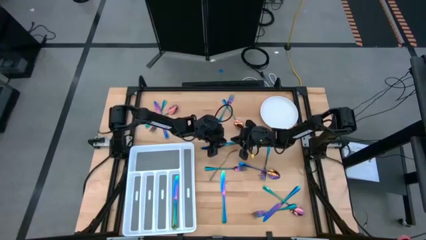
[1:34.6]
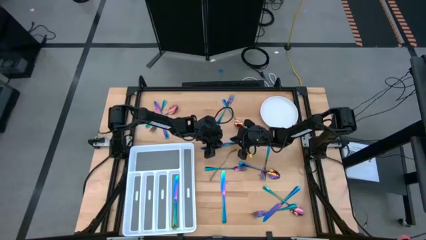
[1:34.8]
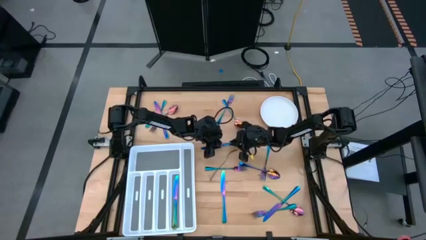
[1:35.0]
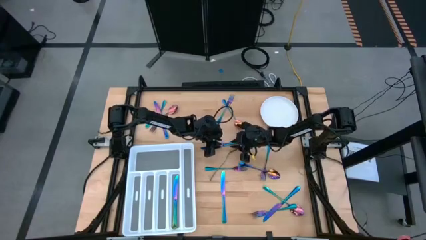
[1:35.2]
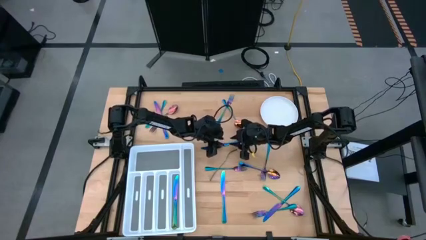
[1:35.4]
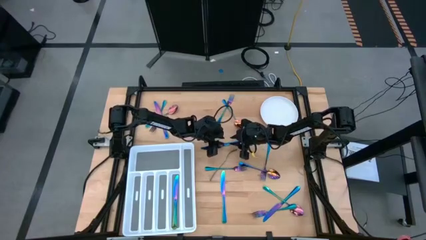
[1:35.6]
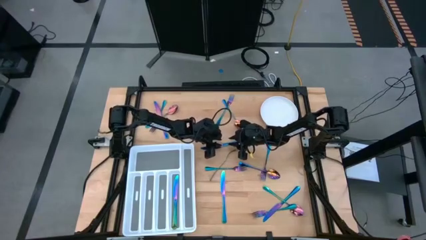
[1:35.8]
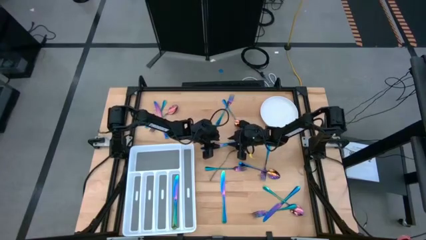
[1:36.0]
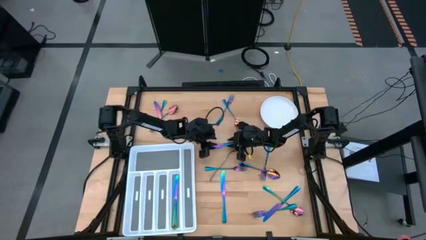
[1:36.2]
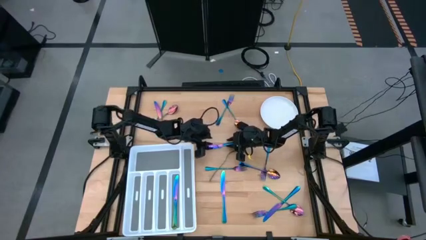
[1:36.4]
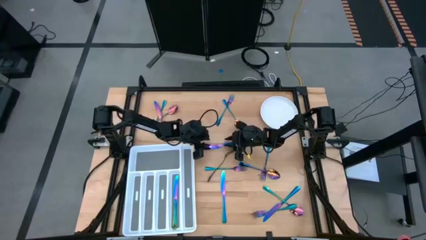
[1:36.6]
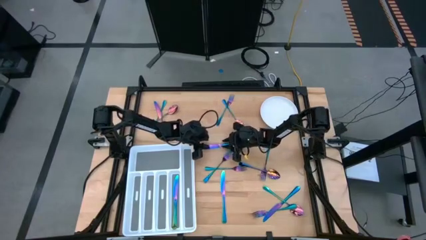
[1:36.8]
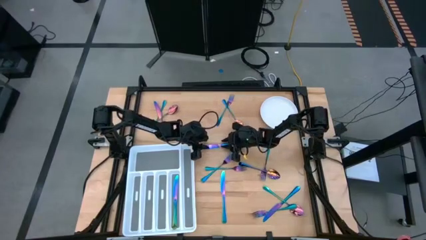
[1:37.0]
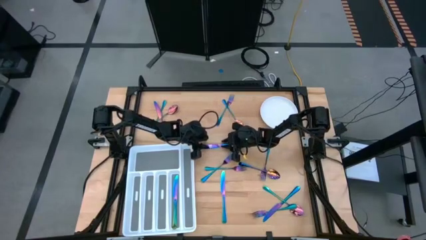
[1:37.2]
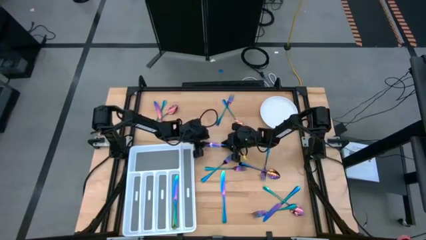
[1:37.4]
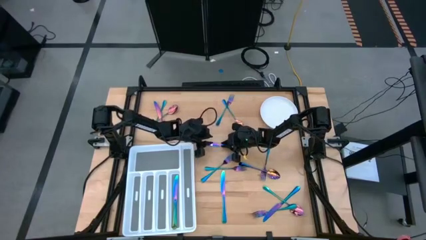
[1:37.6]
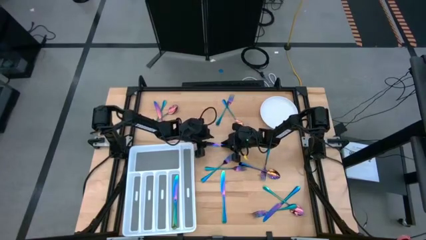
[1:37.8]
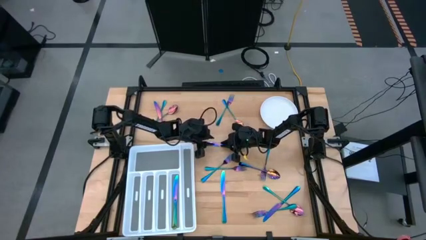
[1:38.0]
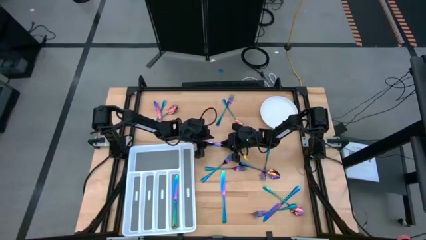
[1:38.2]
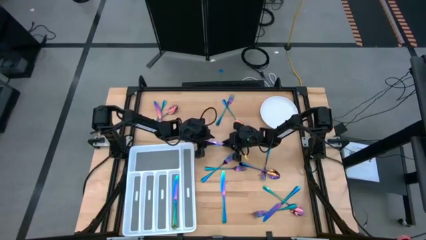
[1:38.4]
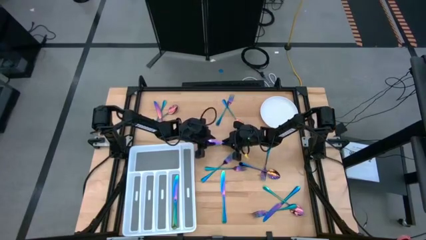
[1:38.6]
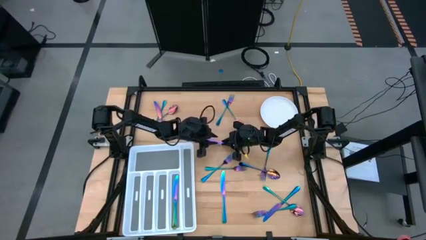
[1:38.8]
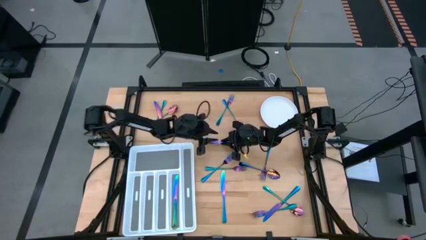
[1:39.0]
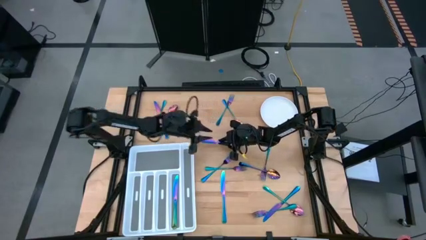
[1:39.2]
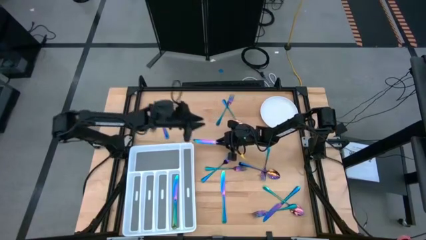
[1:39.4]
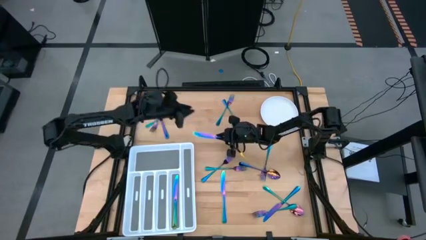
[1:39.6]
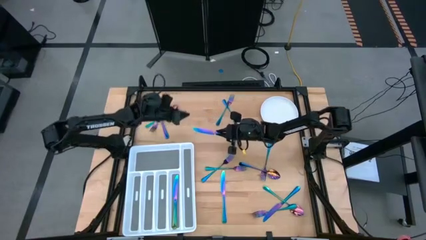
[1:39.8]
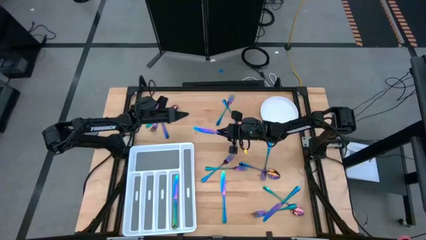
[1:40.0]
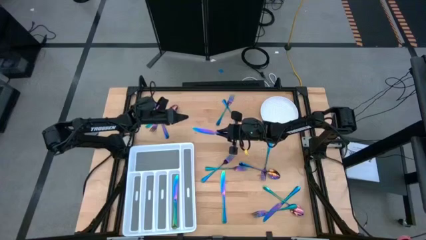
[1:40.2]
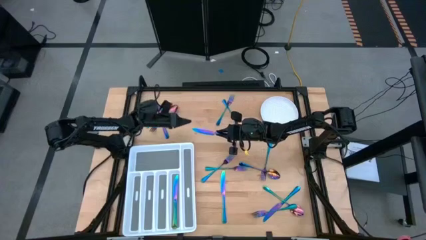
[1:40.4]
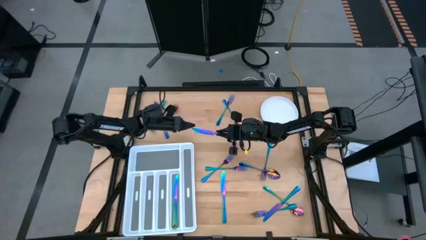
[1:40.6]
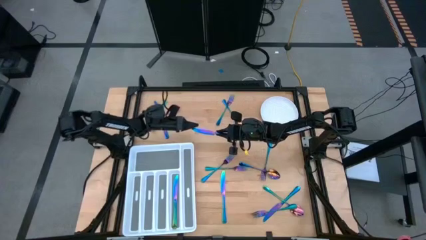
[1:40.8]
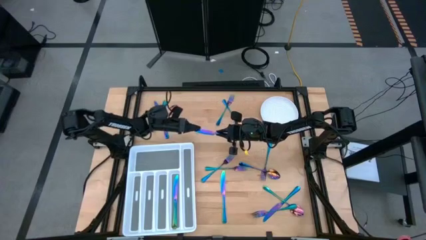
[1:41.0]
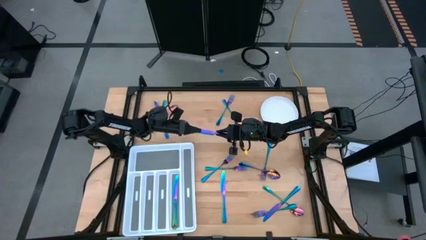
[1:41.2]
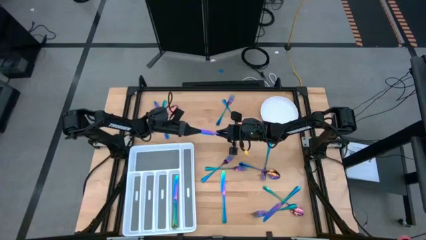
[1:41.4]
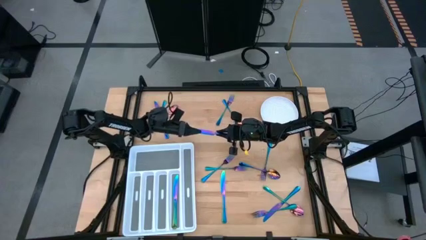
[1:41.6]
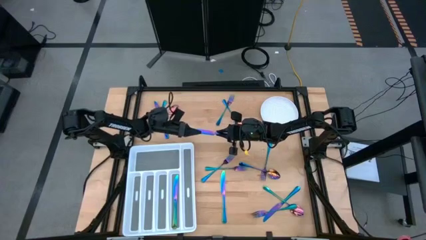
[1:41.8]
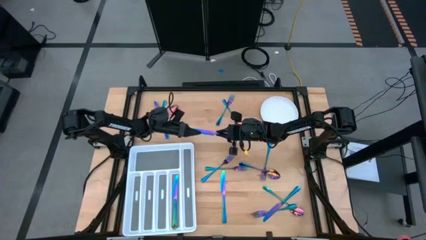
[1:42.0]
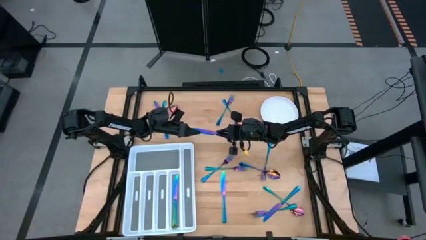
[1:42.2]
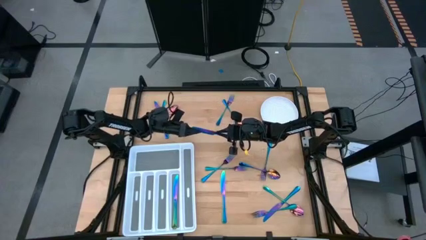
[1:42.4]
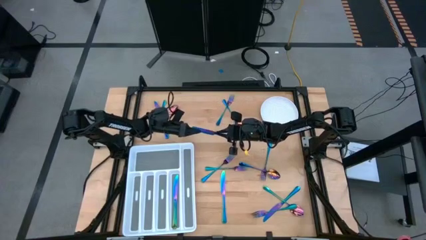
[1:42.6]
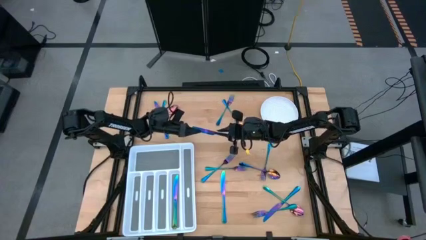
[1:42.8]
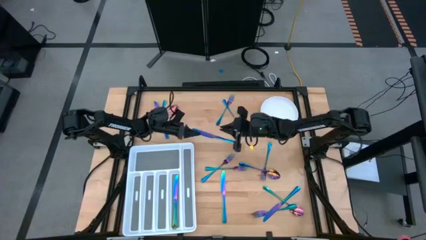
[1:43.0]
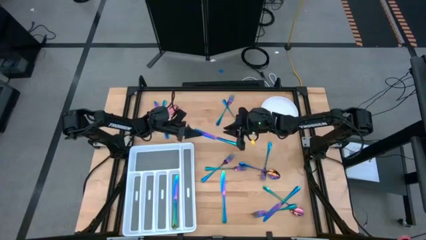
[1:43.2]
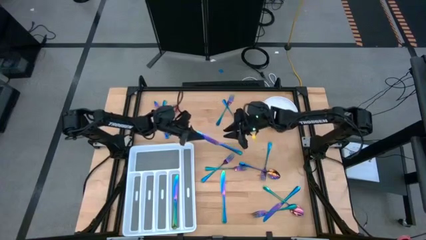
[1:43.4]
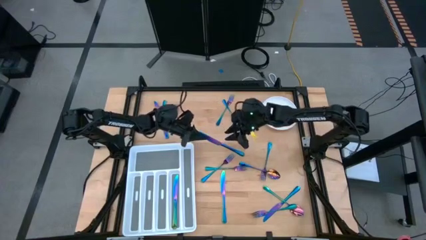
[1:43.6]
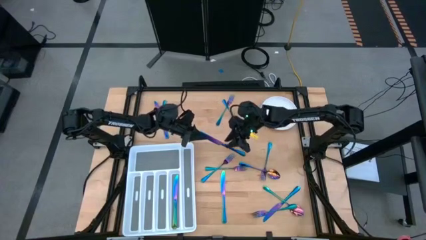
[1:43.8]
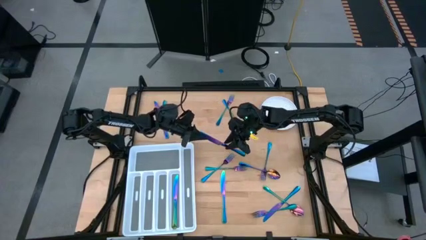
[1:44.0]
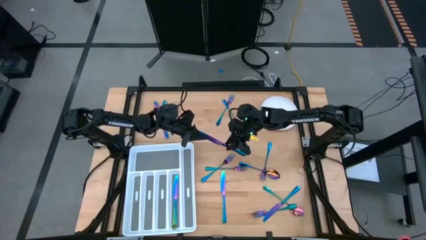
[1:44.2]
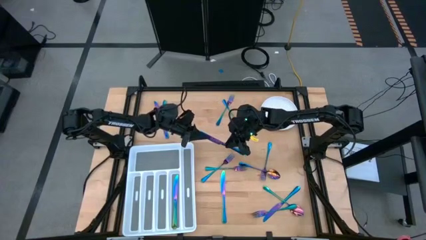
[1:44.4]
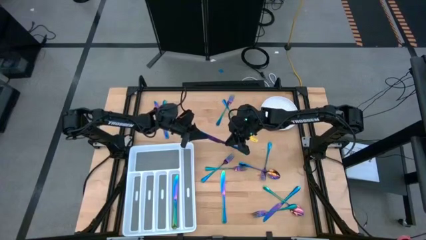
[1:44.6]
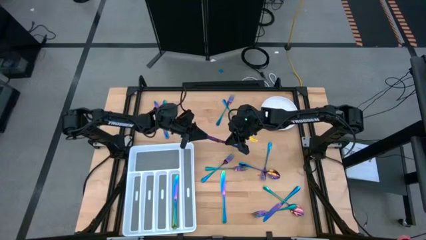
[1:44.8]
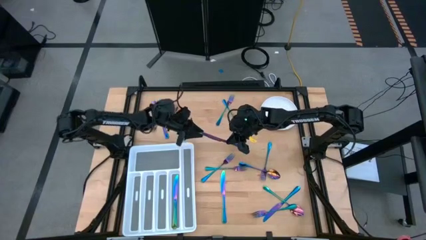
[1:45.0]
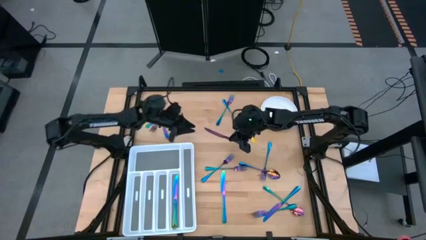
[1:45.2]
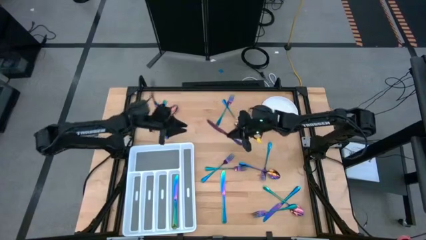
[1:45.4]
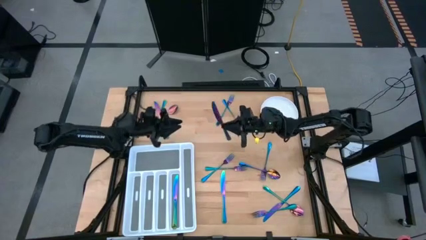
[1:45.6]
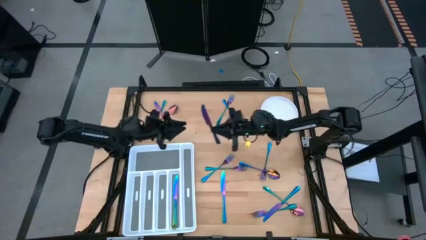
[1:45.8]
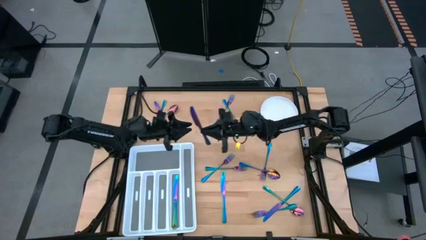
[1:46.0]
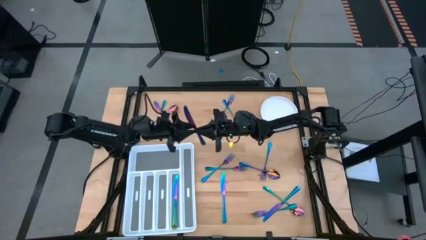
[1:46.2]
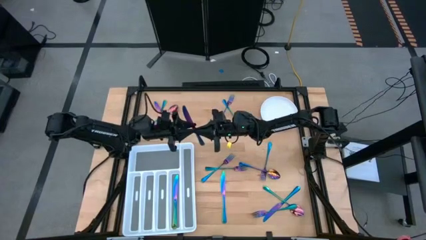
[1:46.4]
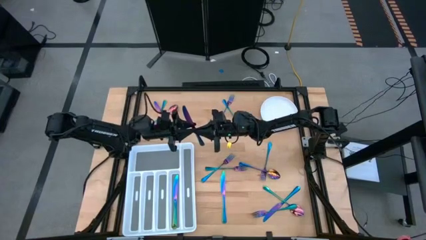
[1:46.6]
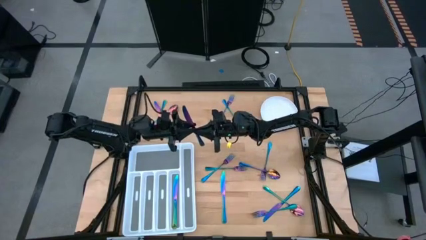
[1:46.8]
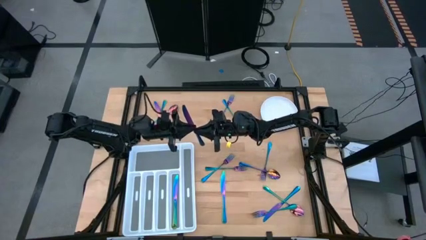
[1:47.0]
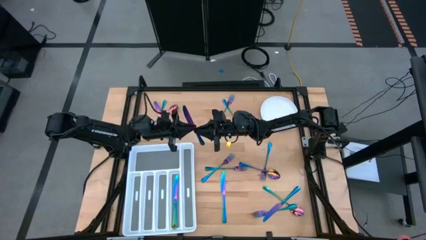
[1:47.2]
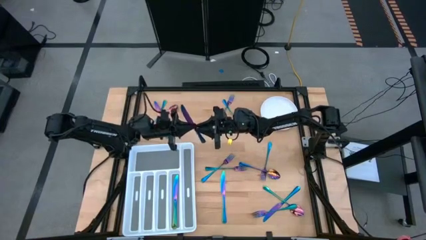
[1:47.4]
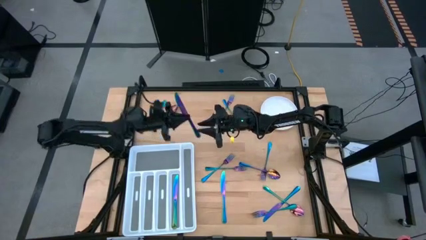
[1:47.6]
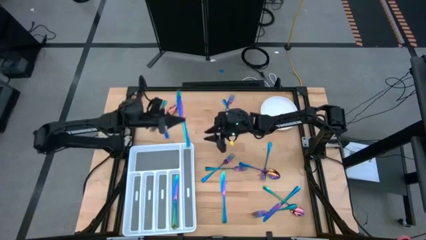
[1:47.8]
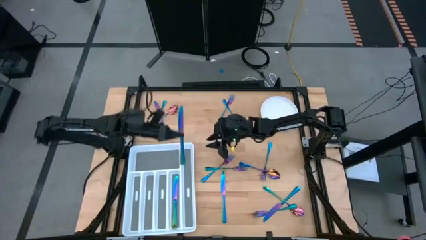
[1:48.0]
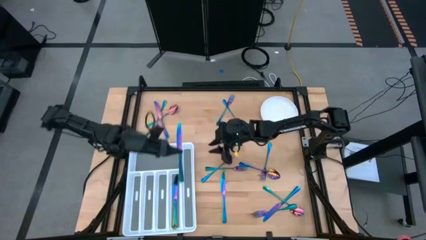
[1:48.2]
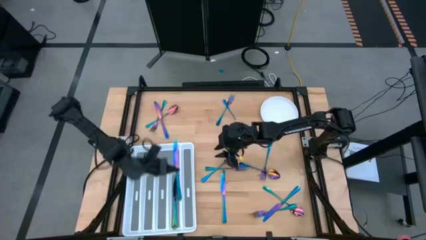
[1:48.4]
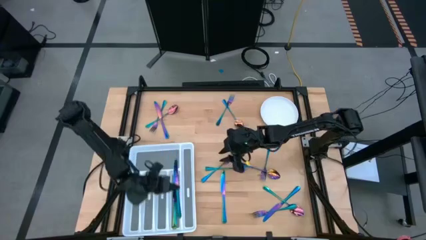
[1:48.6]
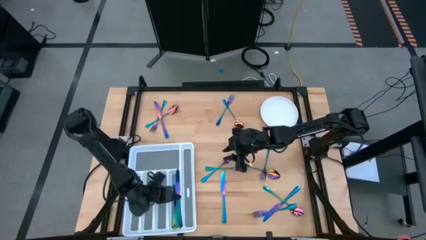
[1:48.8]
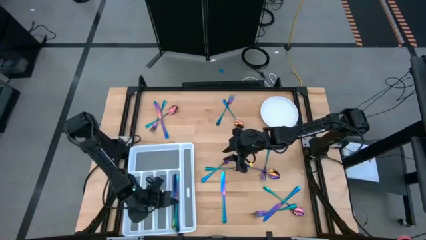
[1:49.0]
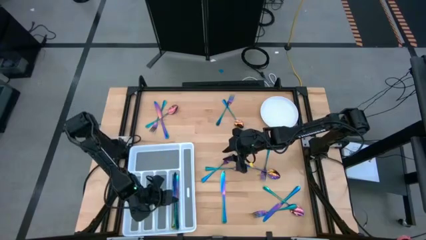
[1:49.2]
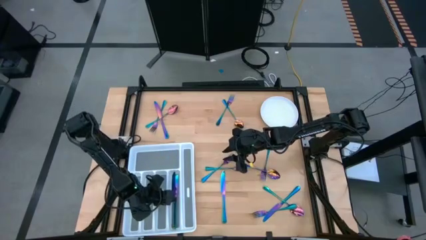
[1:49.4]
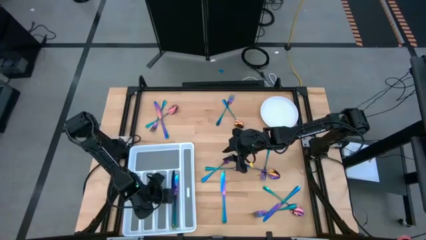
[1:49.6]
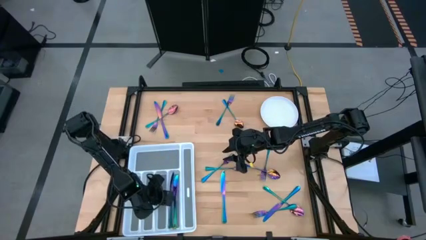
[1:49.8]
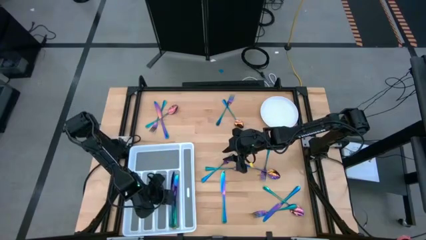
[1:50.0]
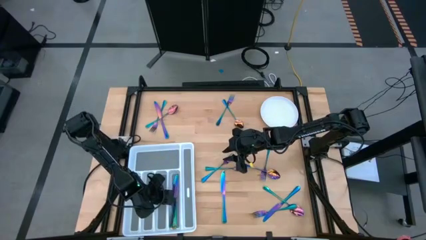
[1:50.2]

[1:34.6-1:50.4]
Task: Sort silverware
Put the top right iridescent knife into the cutlery tray
